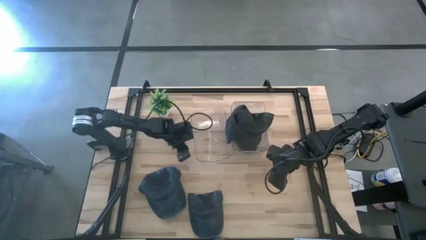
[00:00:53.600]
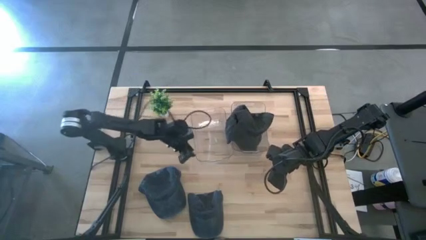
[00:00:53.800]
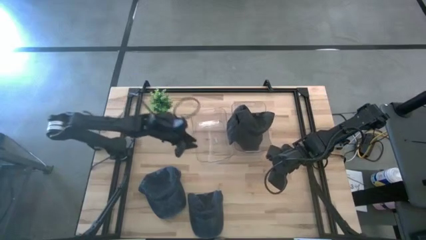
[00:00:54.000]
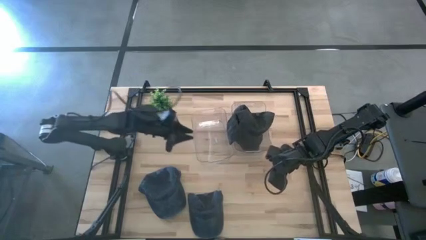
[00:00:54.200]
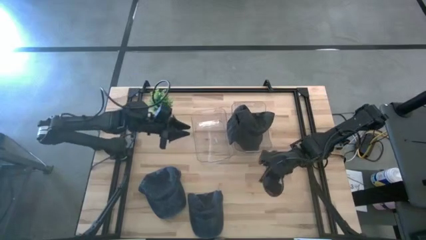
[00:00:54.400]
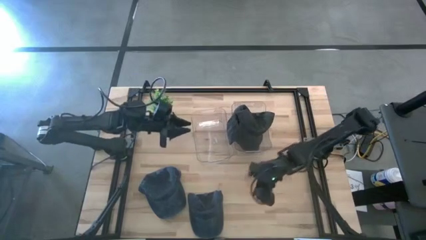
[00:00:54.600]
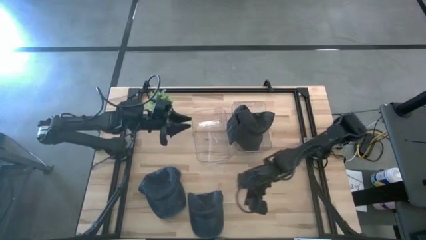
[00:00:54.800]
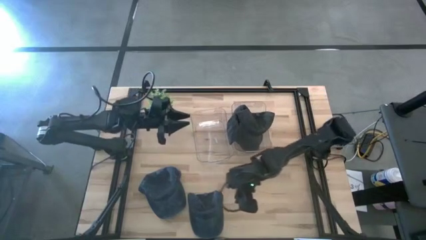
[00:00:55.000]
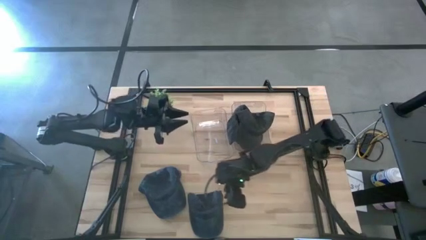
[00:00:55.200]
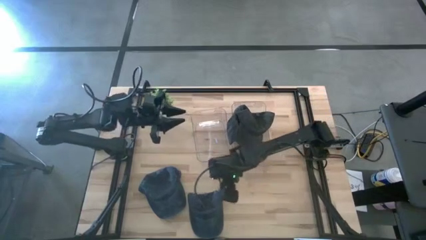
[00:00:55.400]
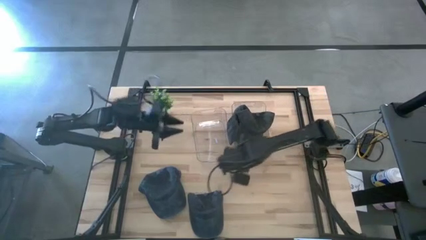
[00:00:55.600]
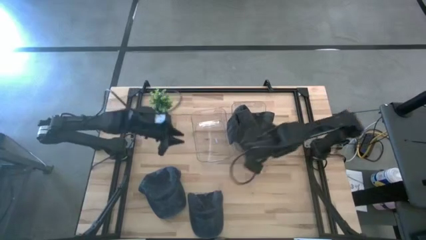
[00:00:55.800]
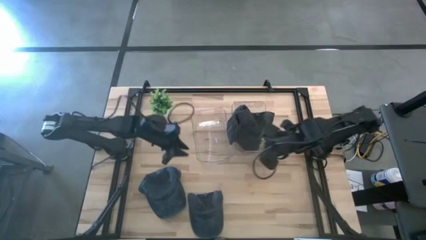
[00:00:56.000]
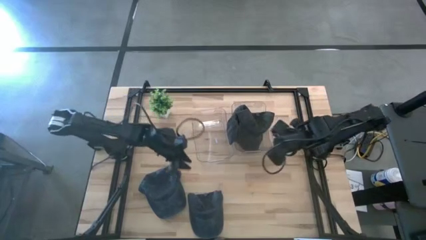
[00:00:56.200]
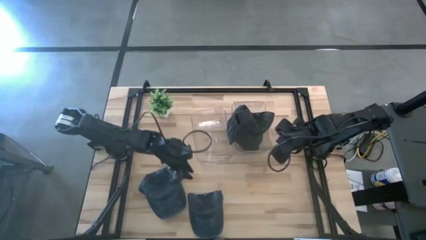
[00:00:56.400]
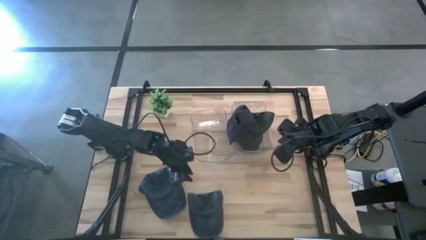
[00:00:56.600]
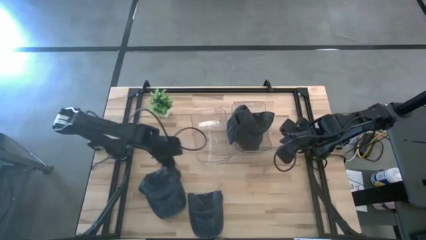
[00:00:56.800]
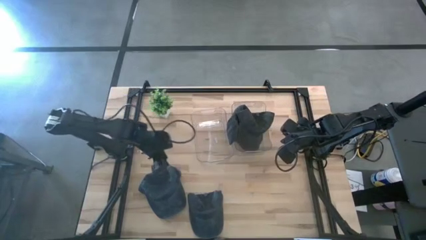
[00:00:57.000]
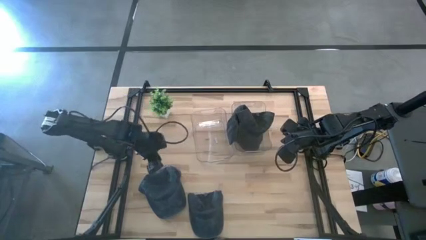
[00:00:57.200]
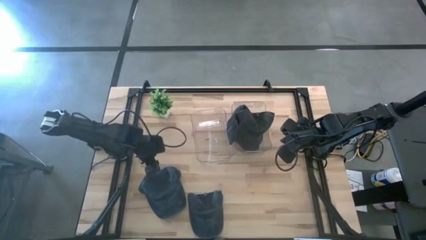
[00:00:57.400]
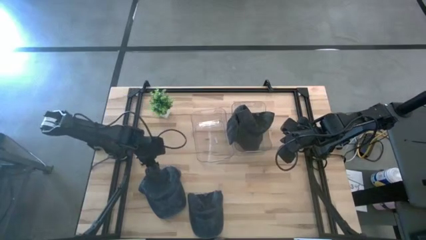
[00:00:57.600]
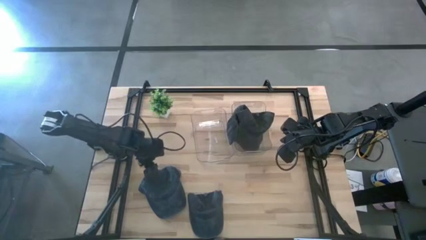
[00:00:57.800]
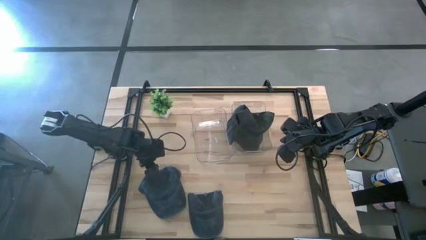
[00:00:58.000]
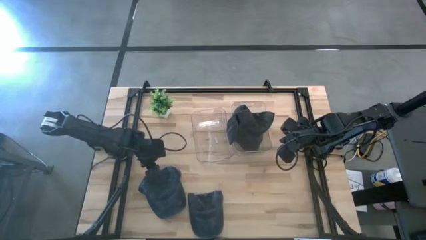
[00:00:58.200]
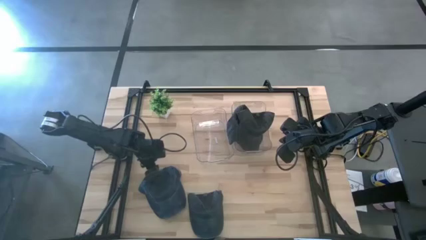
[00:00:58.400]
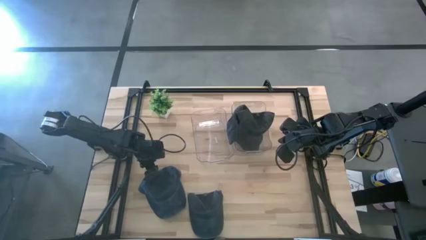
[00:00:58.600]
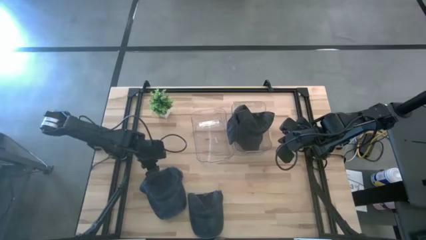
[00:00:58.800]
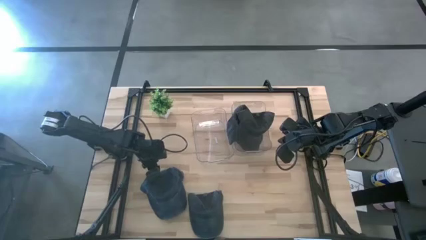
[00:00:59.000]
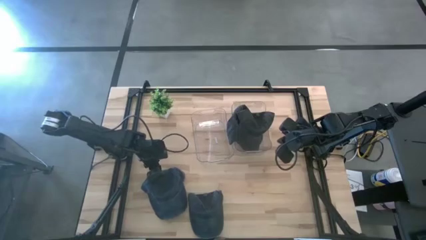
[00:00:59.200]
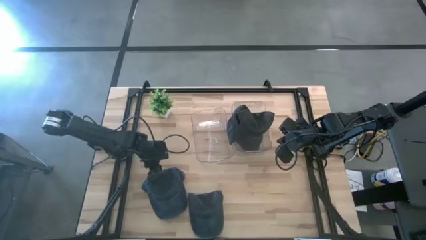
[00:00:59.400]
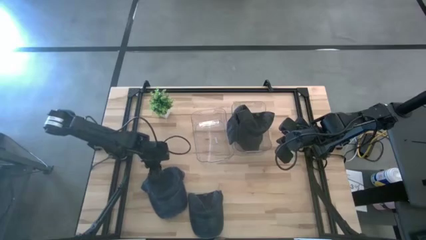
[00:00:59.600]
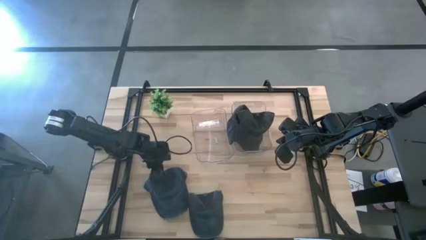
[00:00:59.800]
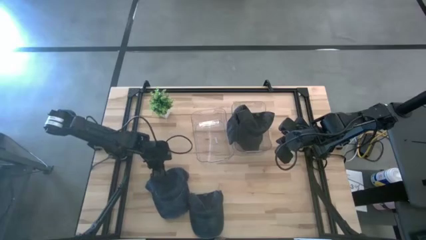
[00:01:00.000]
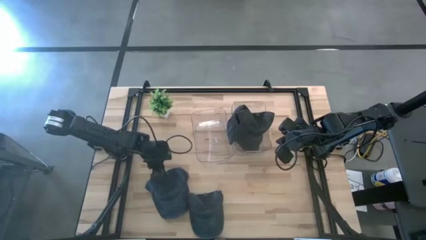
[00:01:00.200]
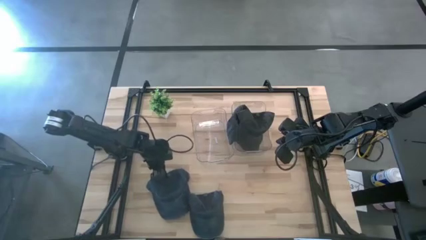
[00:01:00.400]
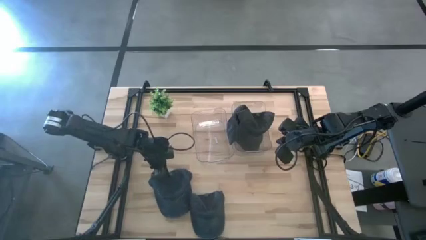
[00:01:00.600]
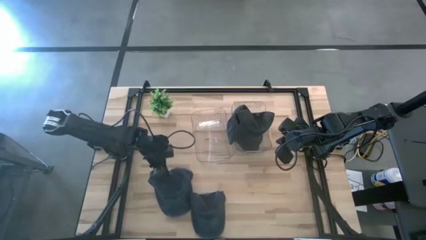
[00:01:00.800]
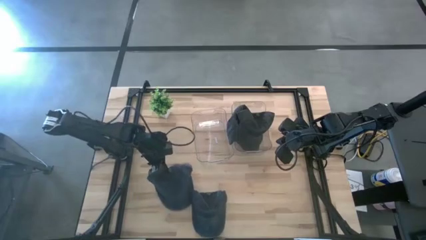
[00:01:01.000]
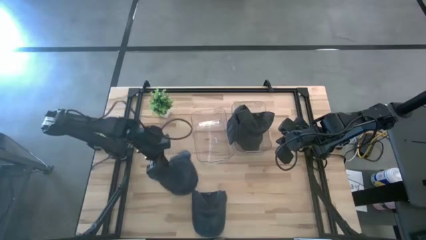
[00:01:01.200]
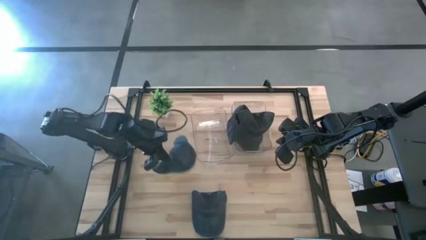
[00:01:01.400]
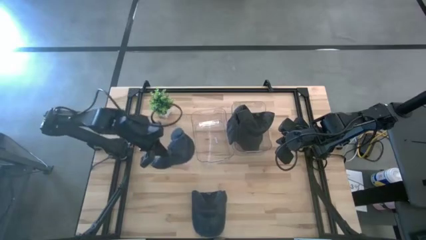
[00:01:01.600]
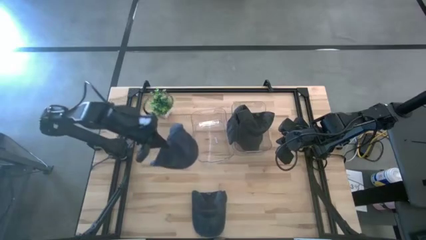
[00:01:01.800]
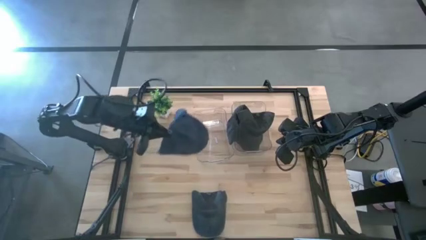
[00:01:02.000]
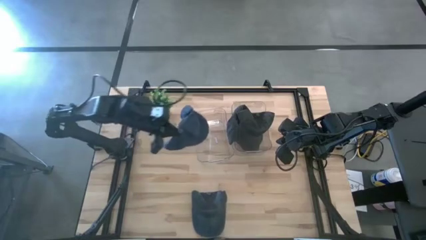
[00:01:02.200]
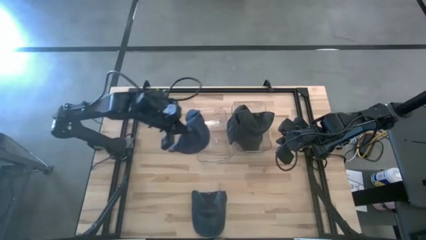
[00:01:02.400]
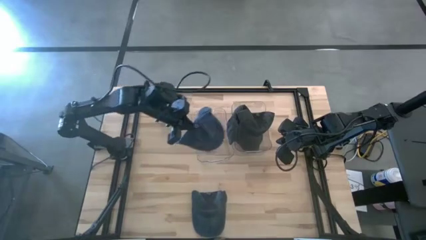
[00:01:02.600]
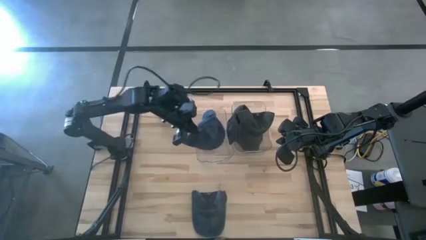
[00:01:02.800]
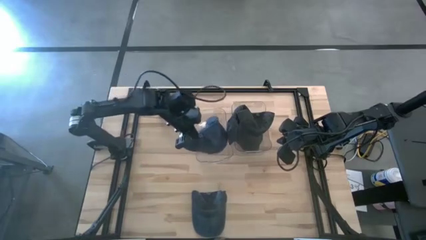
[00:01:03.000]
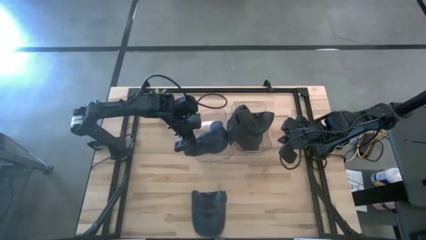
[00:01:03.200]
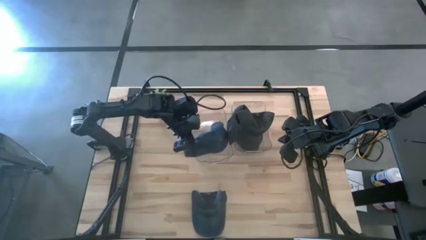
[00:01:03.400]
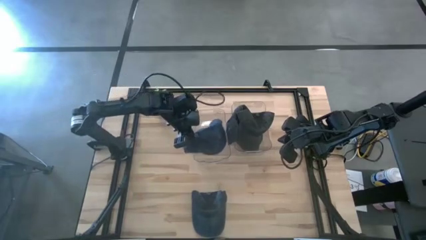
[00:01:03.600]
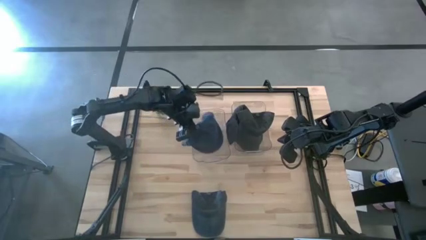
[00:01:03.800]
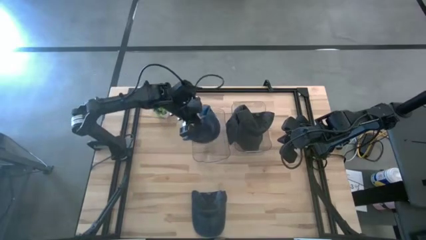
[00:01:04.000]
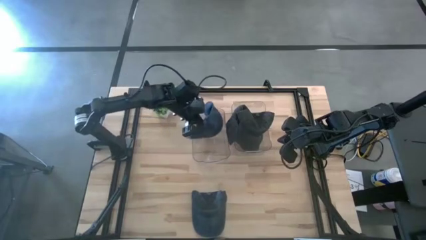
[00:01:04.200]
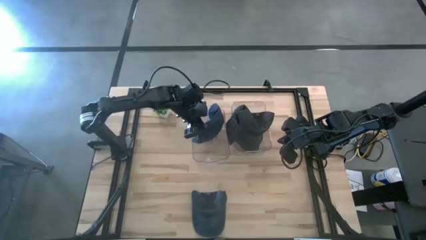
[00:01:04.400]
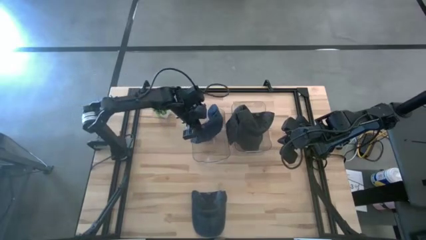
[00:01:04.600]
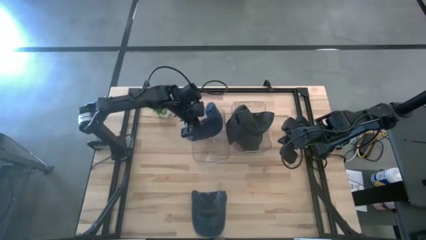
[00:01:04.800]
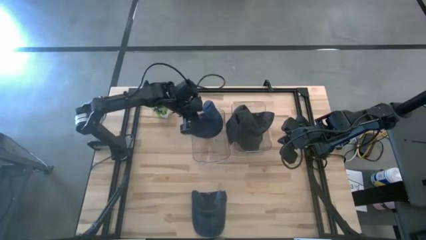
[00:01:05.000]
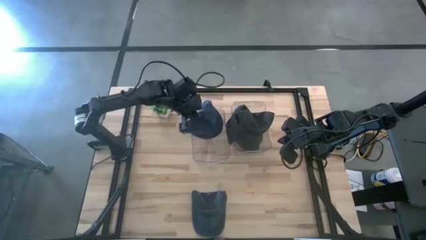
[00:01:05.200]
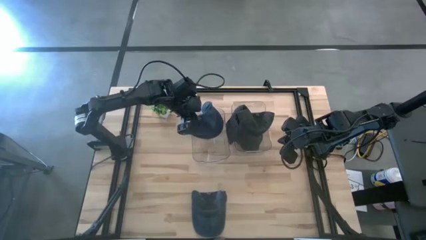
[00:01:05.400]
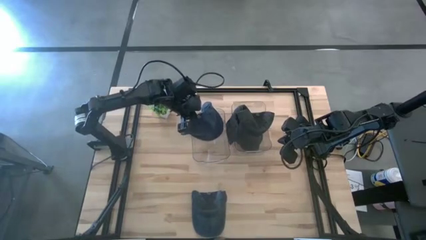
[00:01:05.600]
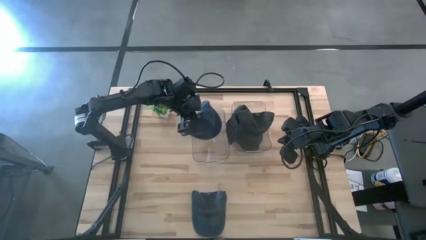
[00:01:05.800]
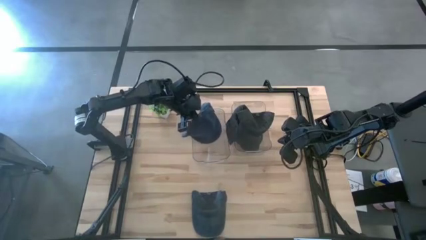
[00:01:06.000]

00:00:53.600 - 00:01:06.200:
Task: Pick & Place hat
Put the left blue cap into the left transparent bin

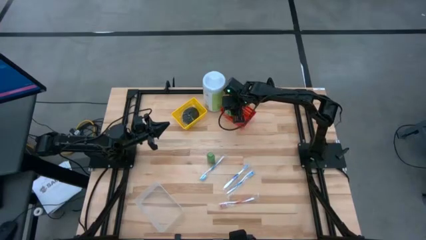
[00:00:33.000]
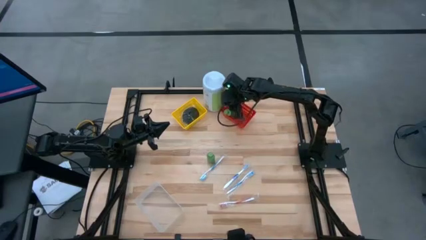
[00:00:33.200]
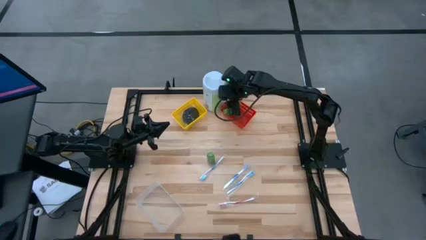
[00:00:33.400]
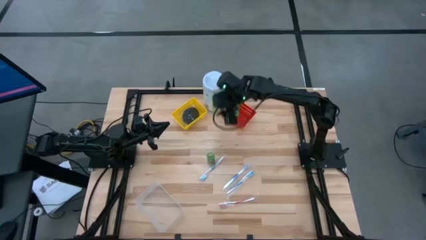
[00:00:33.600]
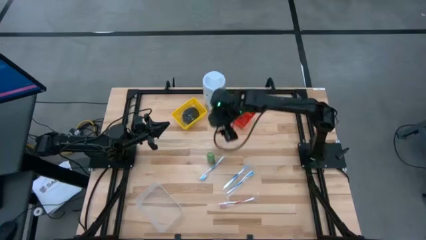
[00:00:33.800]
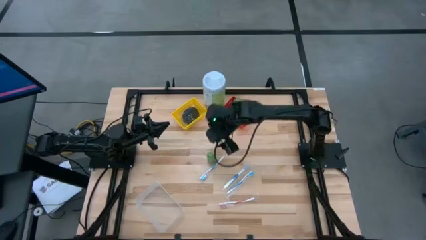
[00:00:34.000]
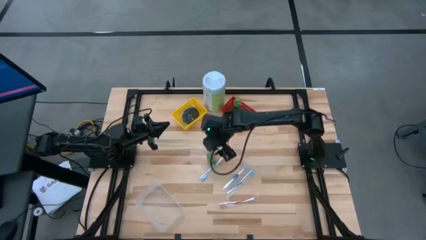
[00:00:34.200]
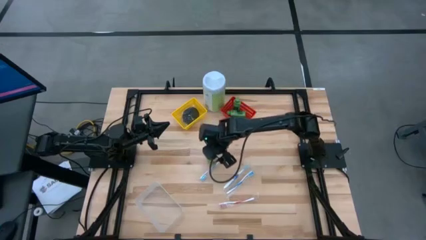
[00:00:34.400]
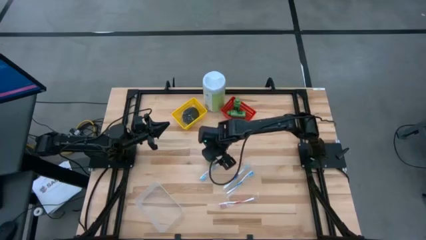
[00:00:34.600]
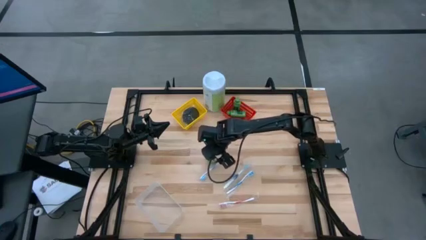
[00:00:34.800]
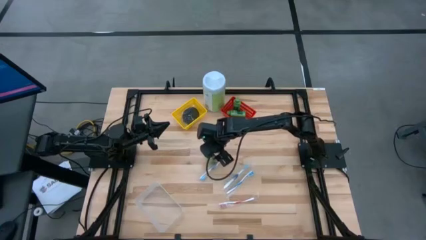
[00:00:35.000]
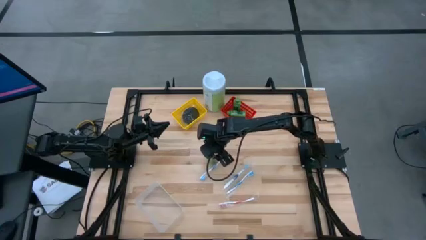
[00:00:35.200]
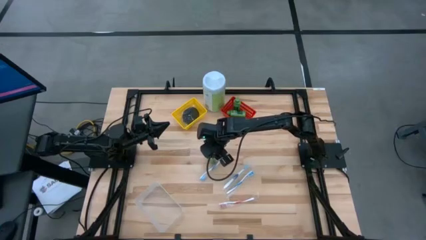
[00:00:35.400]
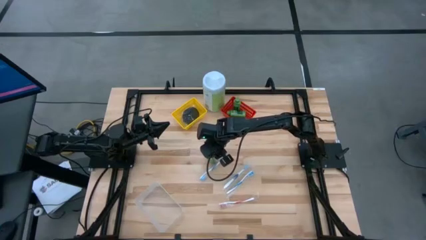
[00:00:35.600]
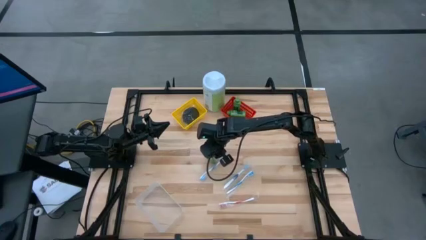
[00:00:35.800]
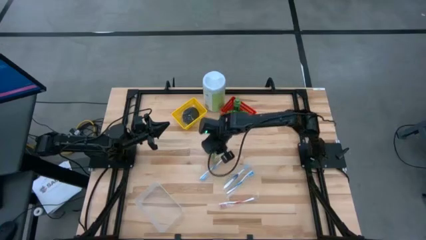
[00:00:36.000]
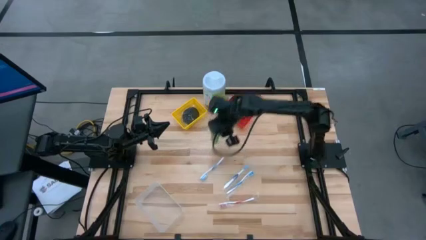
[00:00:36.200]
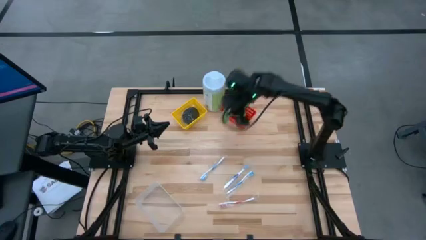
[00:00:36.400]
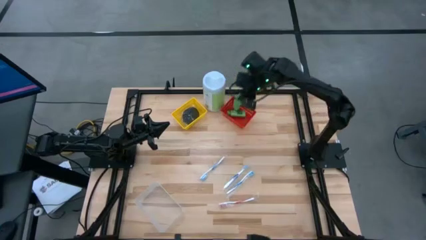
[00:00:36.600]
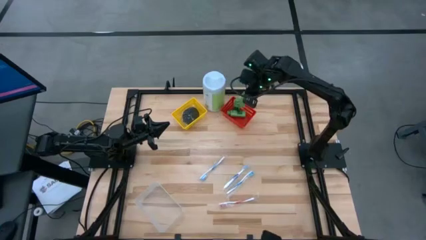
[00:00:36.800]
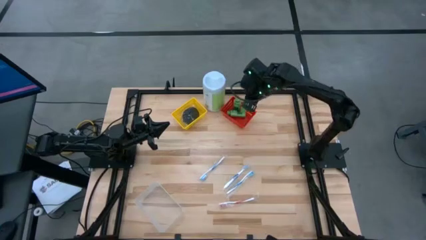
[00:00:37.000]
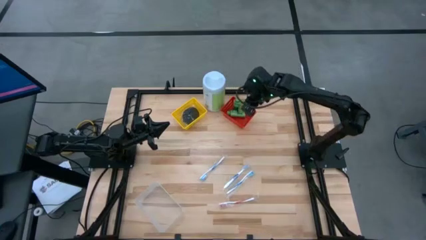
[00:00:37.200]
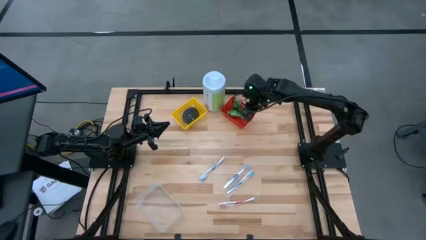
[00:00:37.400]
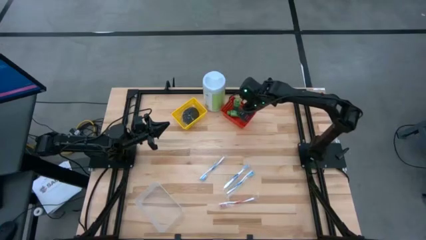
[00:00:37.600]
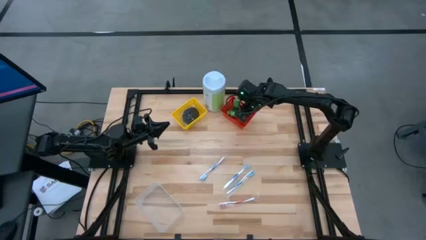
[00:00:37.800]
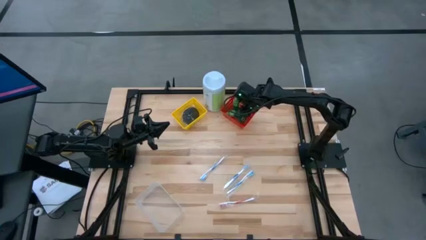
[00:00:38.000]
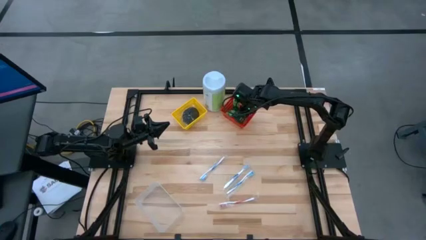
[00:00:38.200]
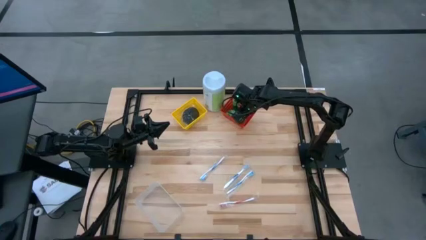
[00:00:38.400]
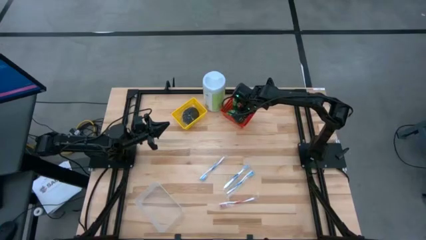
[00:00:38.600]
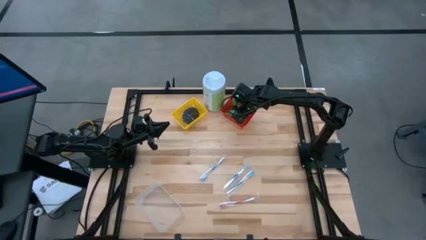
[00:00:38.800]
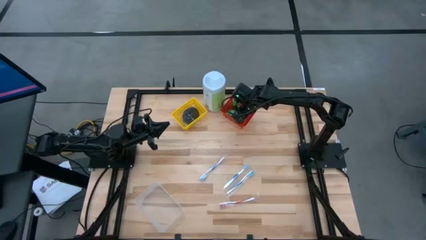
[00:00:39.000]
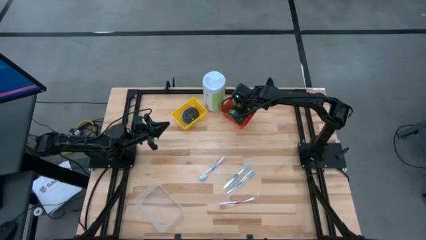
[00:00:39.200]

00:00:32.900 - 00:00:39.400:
Task: Pick & Place Travel size toiletries
Put the green shampoo into the red bin
